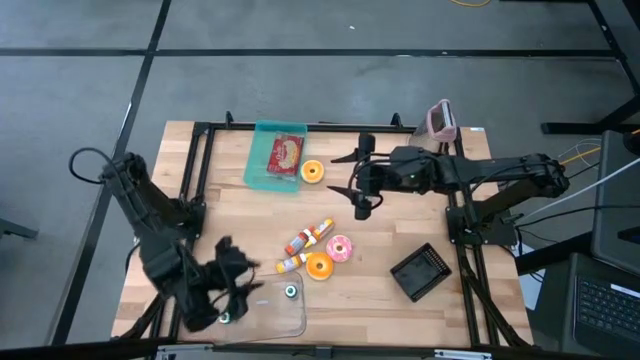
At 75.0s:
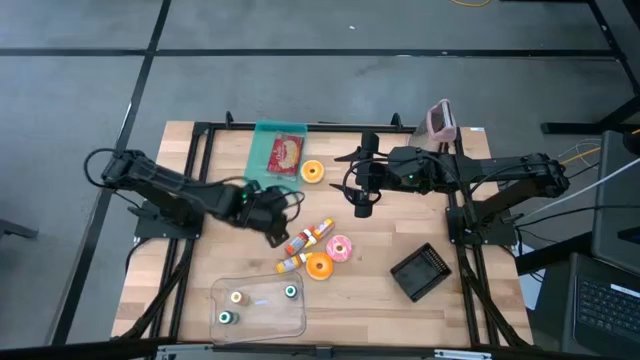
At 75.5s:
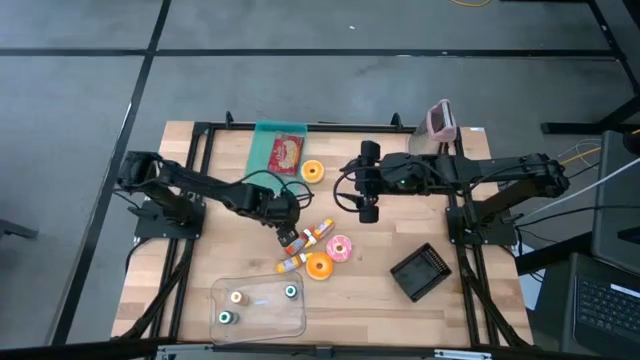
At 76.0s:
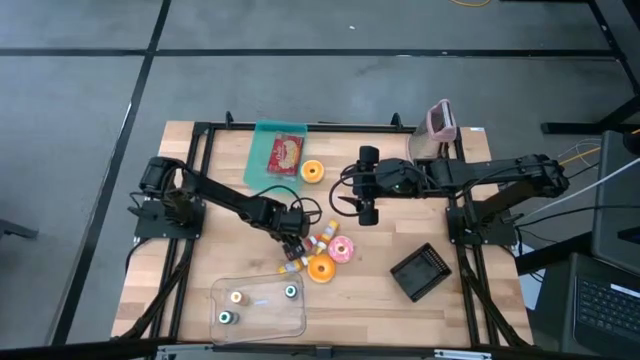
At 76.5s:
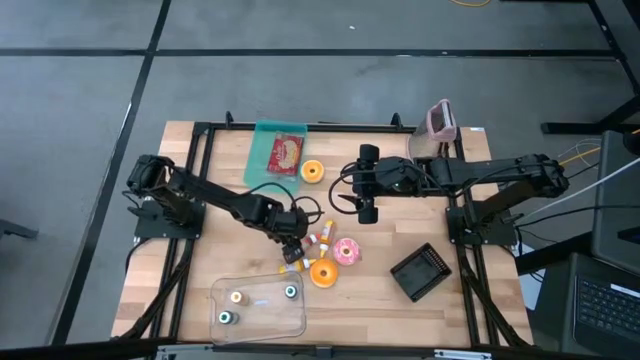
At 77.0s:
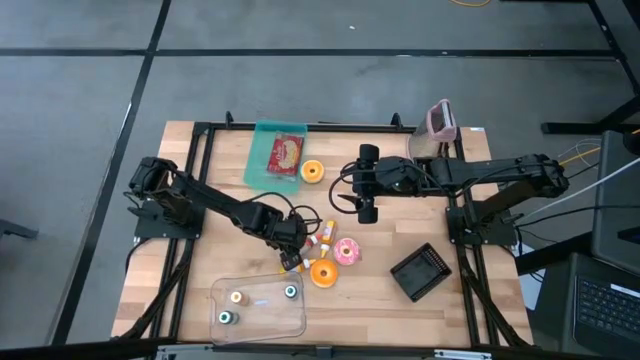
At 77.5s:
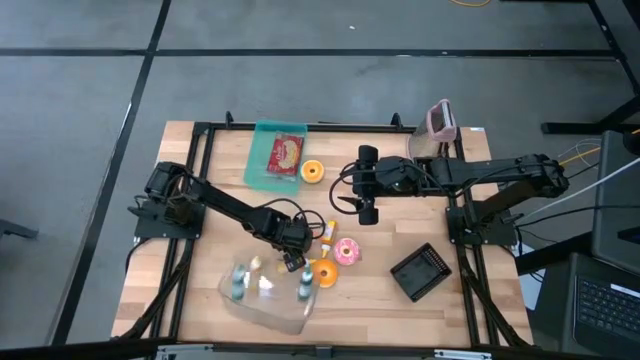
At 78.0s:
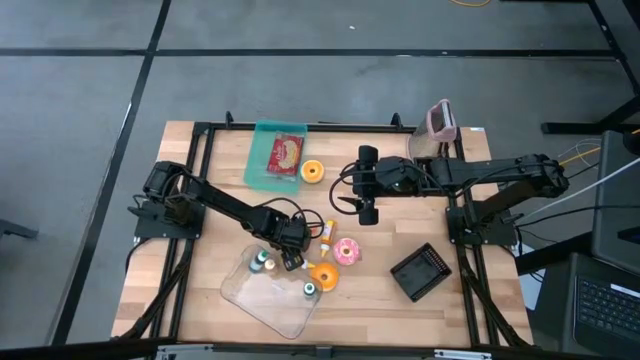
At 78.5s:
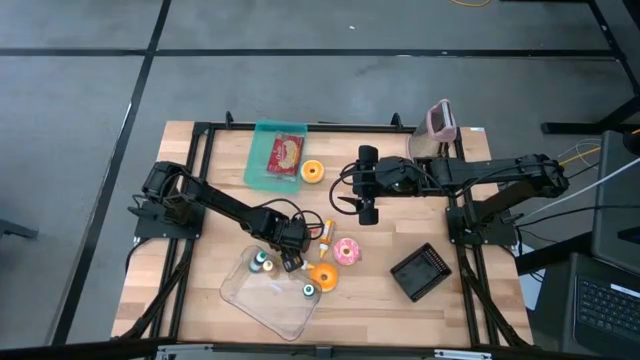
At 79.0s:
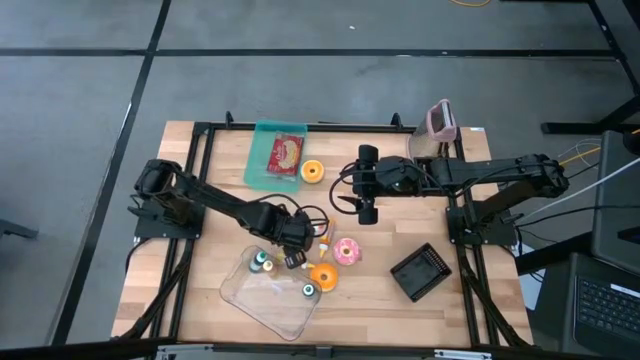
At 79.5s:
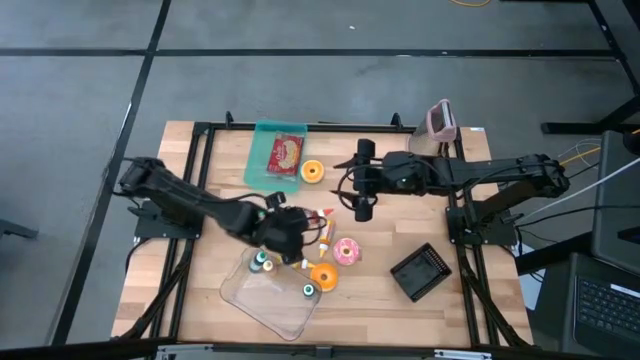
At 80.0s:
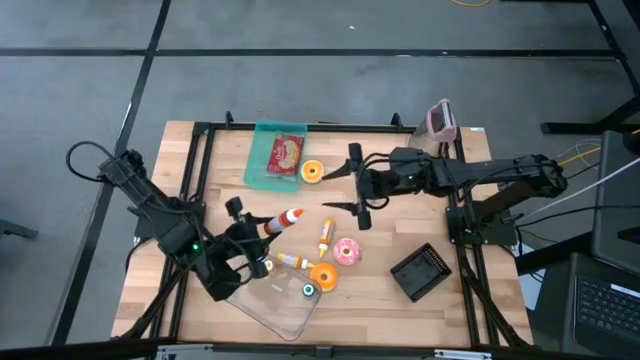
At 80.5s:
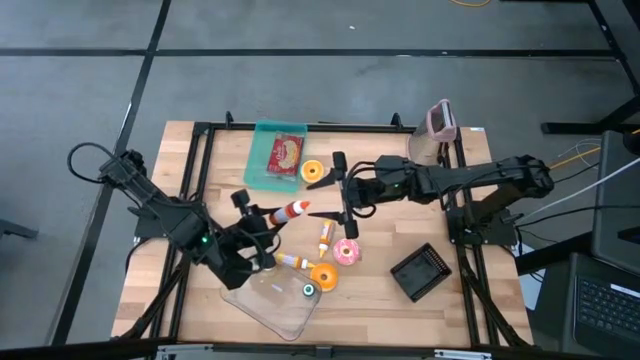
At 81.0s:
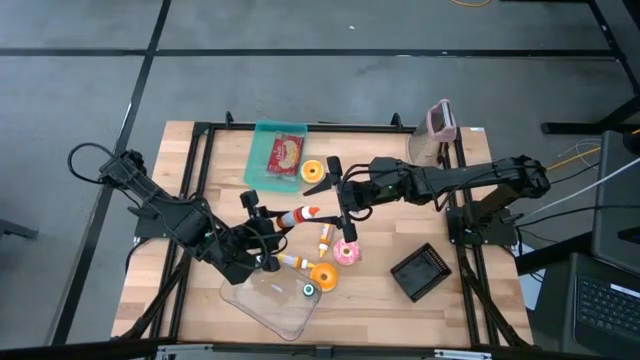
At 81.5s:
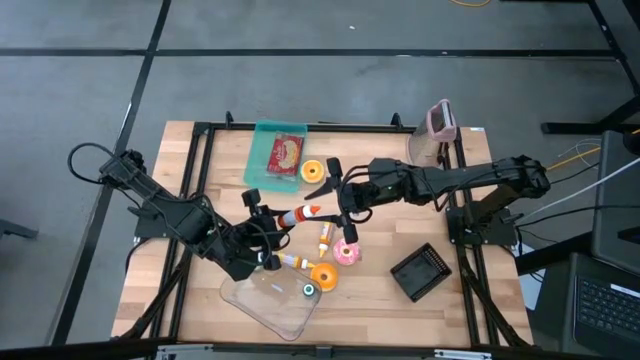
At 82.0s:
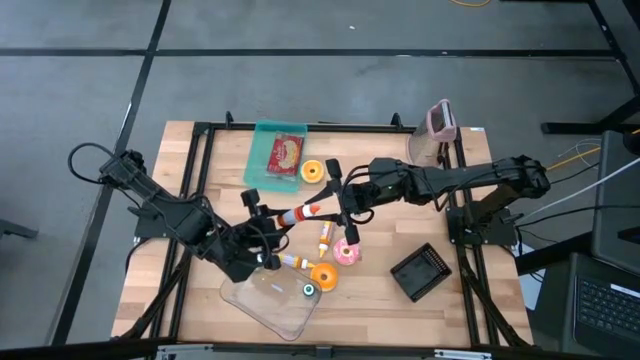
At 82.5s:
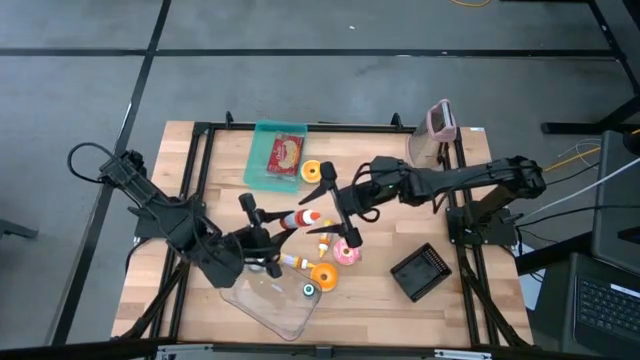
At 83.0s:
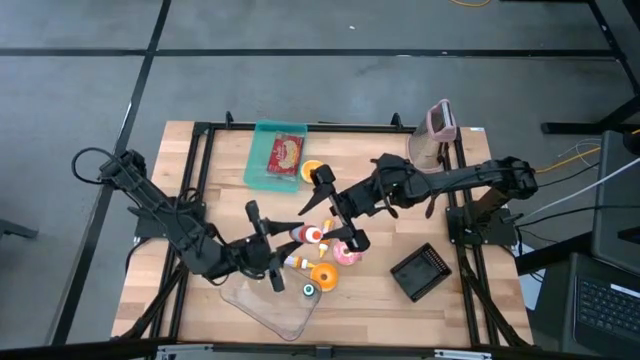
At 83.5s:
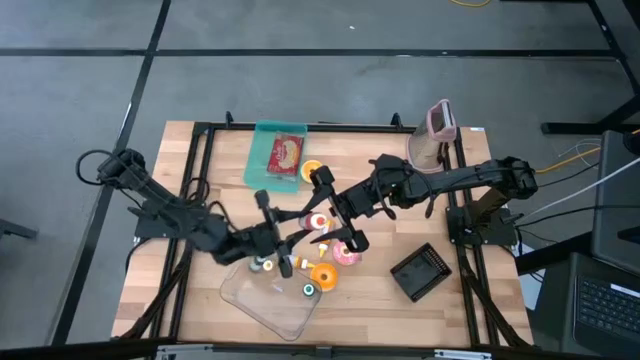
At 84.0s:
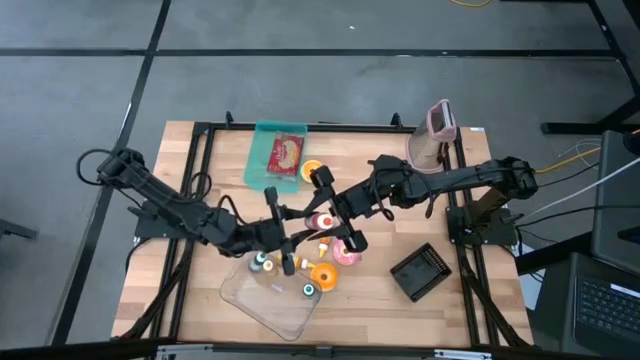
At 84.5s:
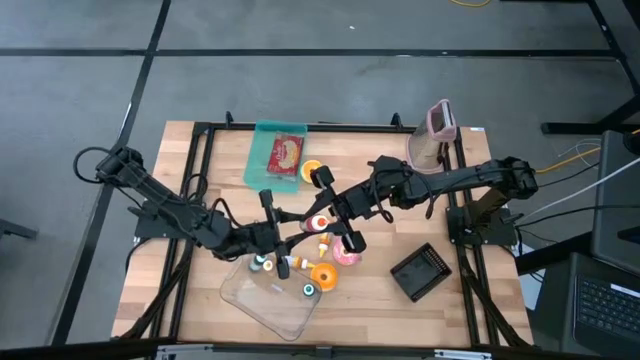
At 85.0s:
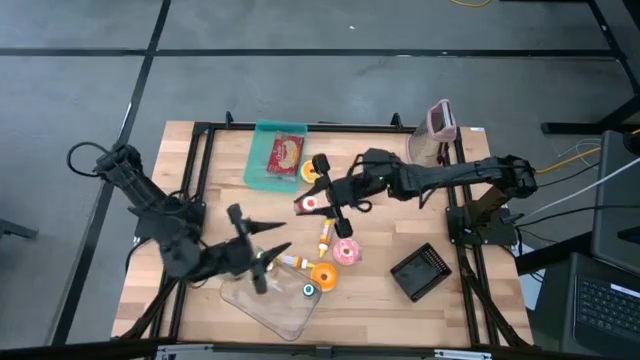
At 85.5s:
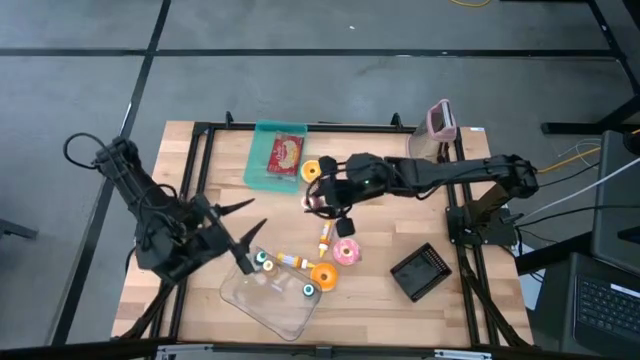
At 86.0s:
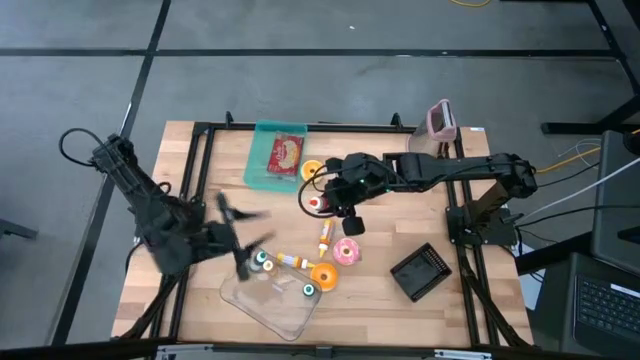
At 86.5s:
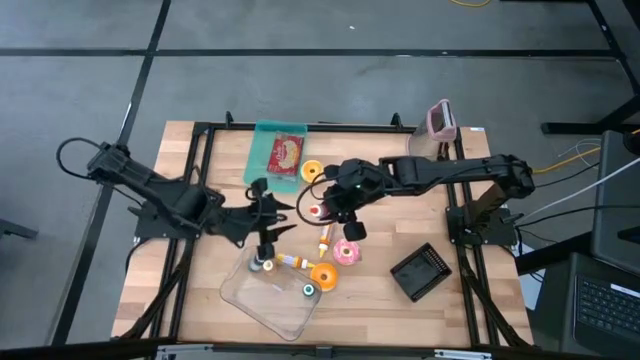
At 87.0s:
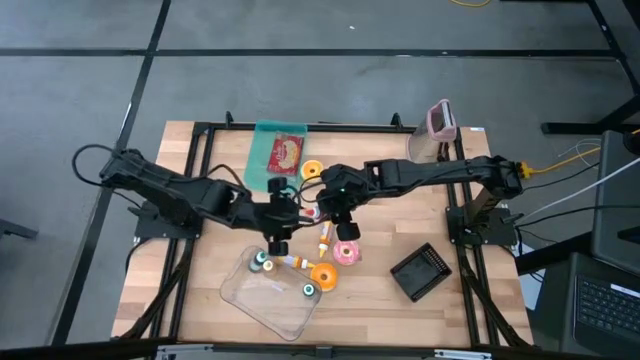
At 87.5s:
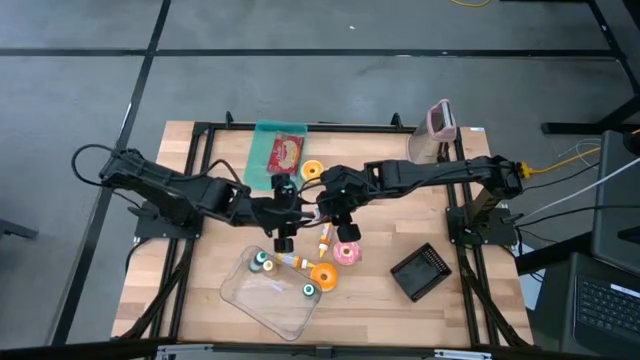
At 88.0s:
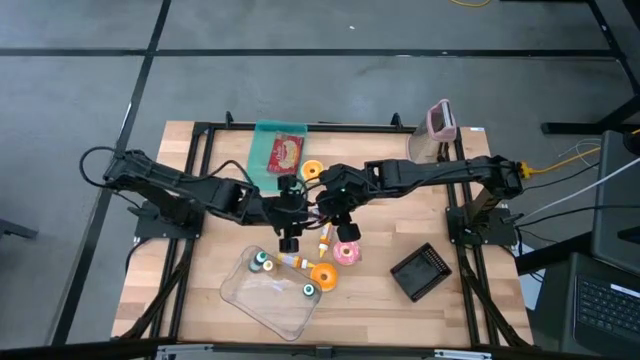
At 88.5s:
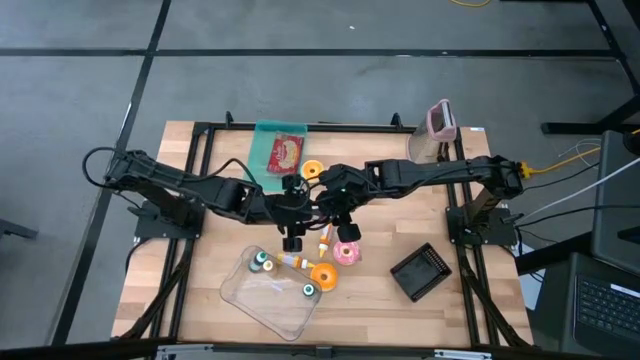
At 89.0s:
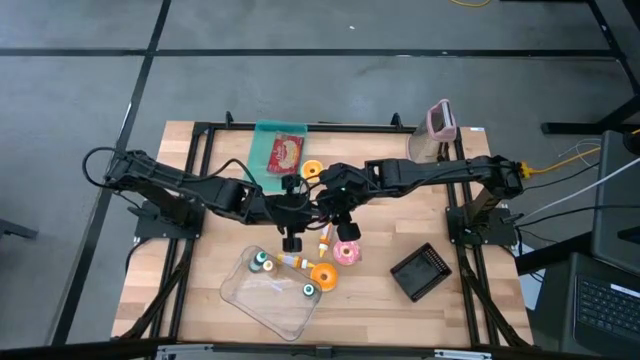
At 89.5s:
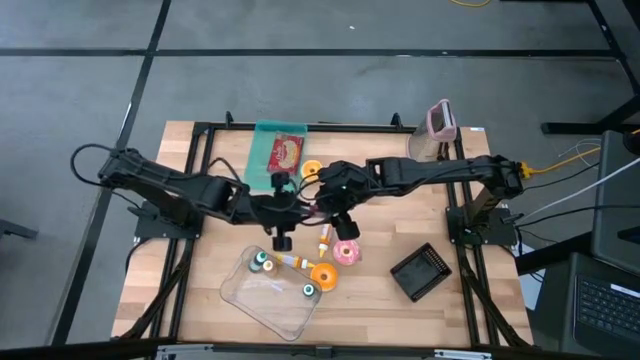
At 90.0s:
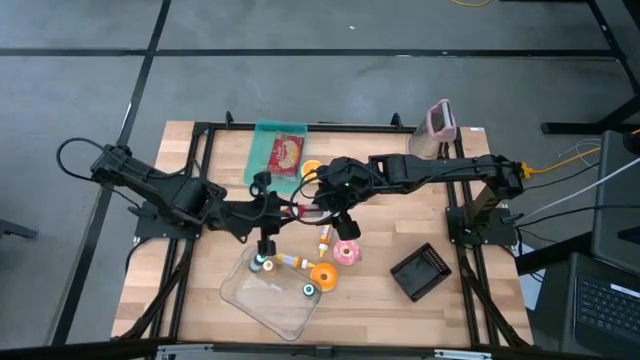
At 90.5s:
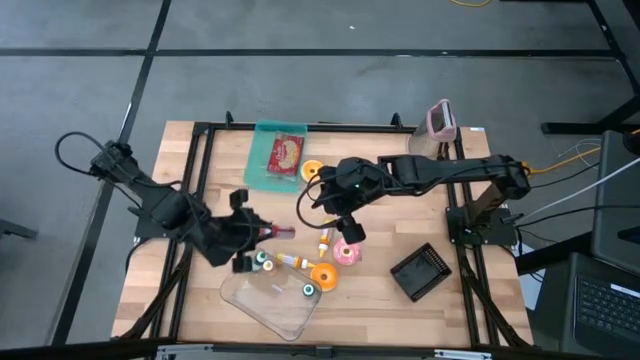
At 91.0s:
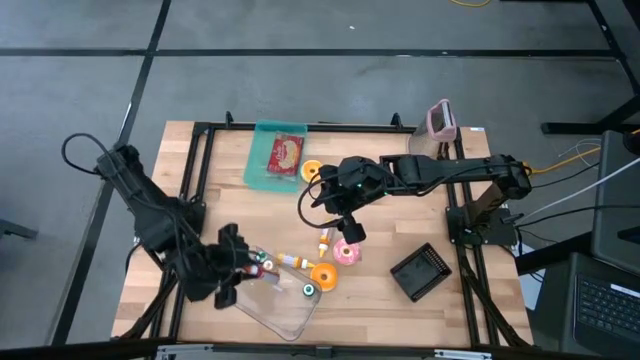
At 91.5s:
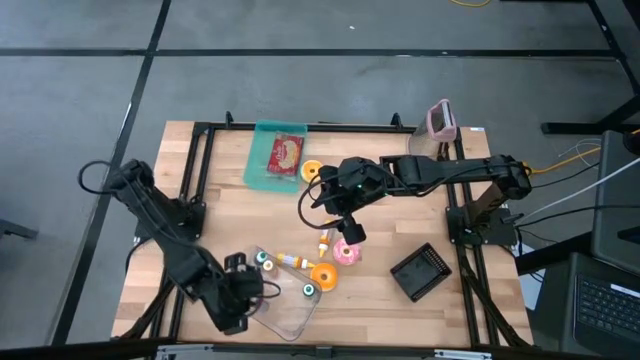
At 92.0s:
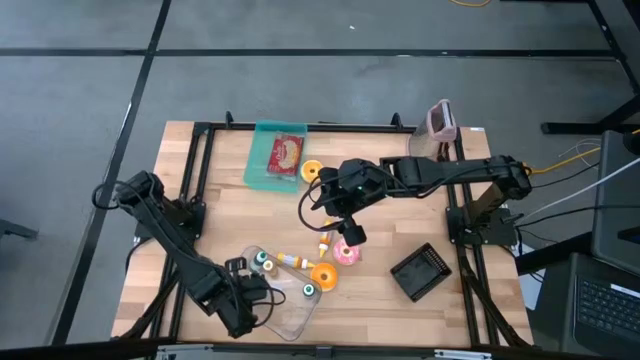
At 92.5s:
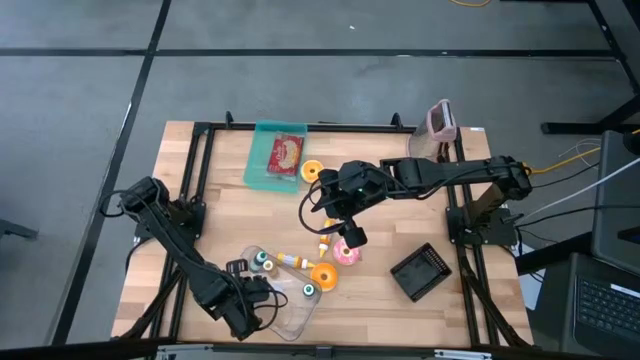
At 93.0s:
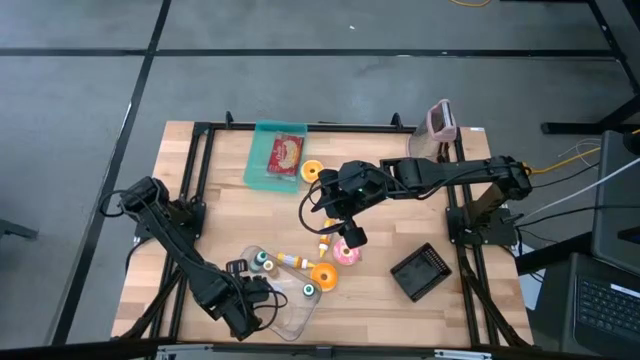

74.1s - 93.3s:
Put the orange food coloring bottle into the transparent bin
